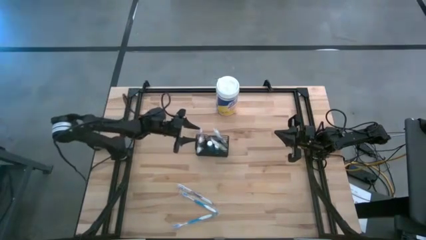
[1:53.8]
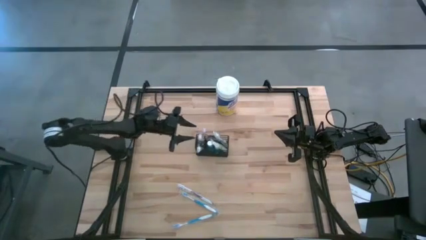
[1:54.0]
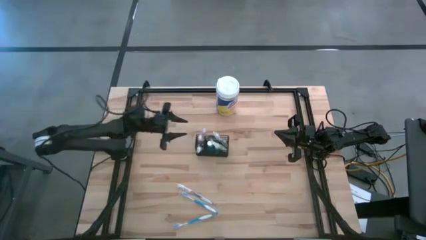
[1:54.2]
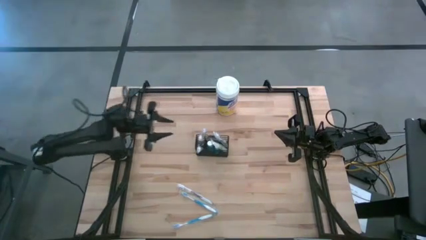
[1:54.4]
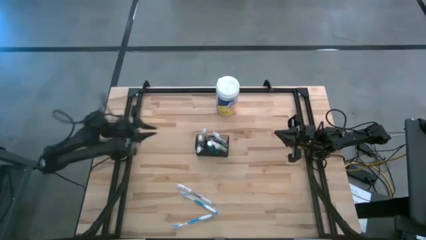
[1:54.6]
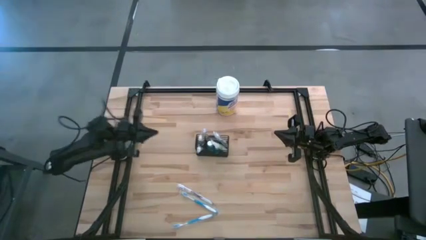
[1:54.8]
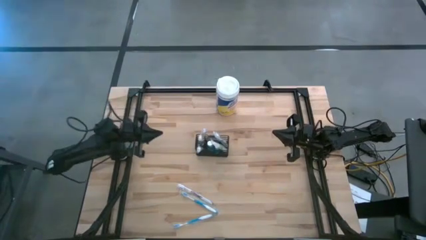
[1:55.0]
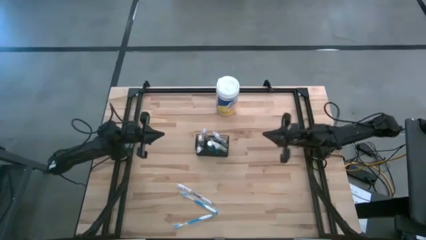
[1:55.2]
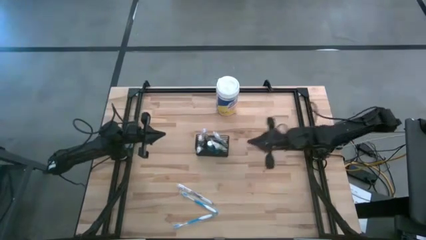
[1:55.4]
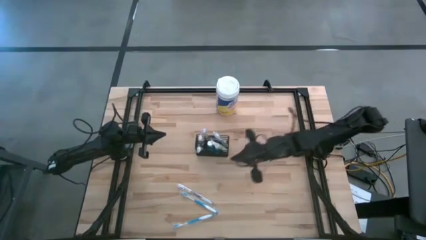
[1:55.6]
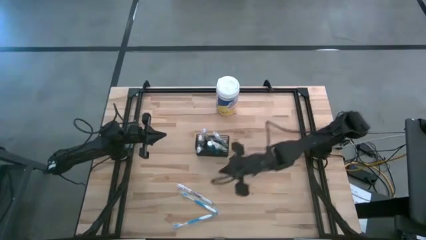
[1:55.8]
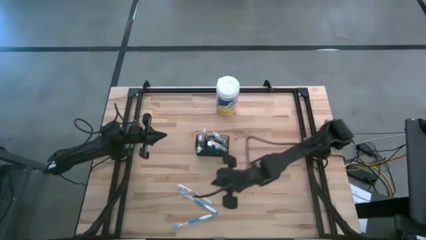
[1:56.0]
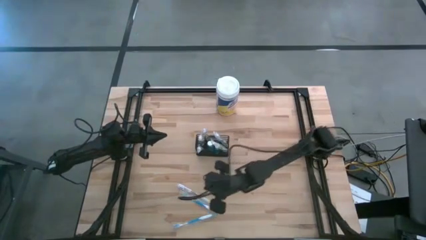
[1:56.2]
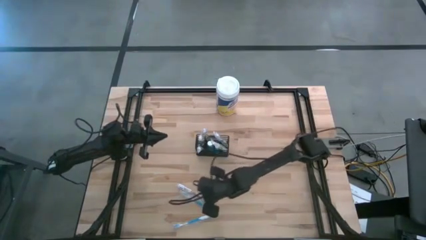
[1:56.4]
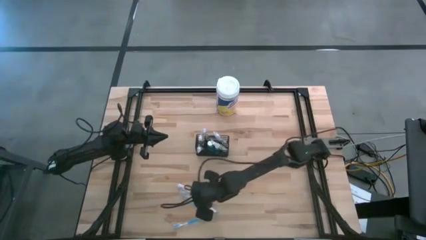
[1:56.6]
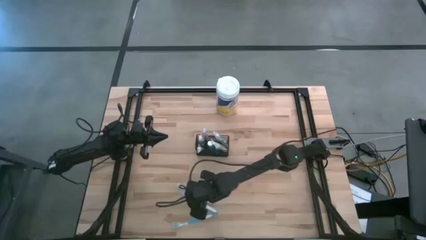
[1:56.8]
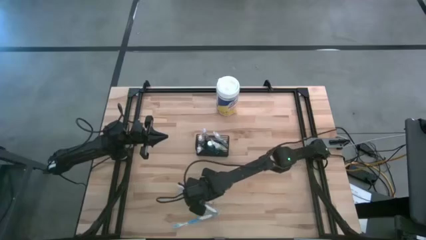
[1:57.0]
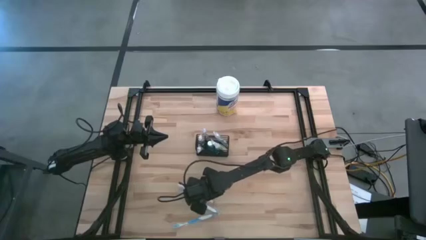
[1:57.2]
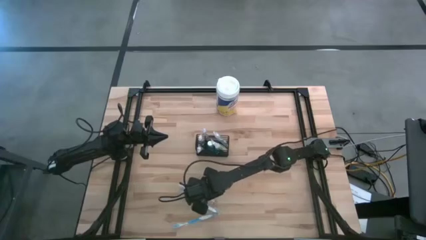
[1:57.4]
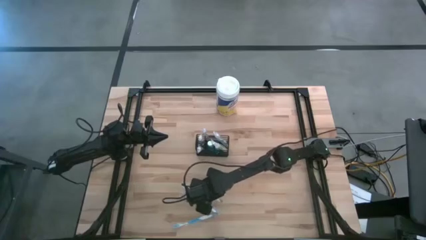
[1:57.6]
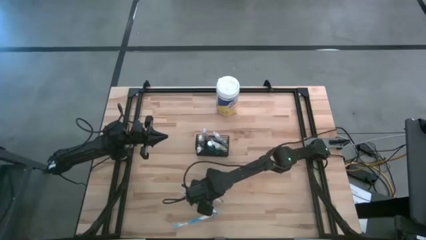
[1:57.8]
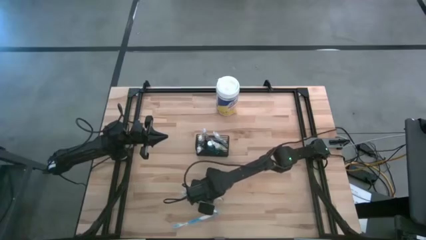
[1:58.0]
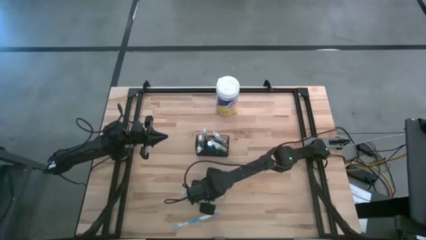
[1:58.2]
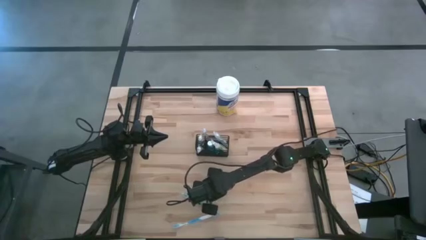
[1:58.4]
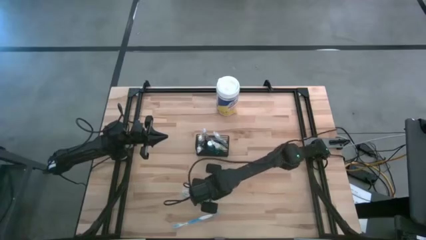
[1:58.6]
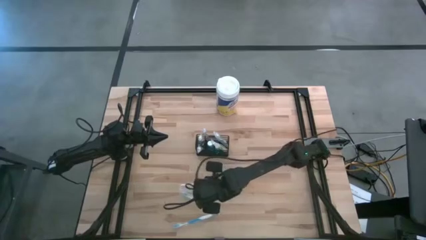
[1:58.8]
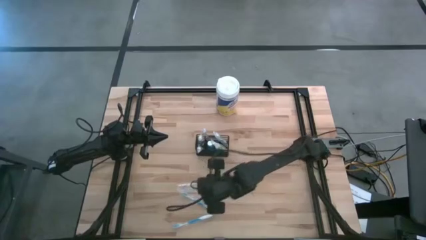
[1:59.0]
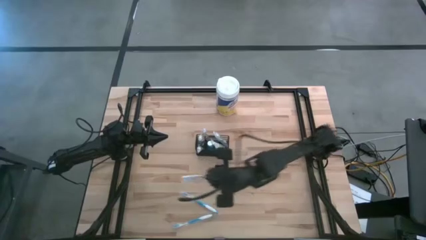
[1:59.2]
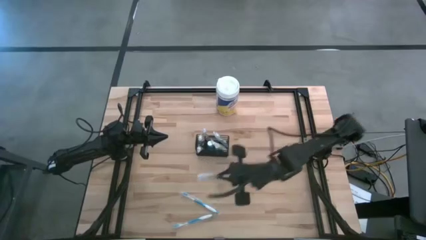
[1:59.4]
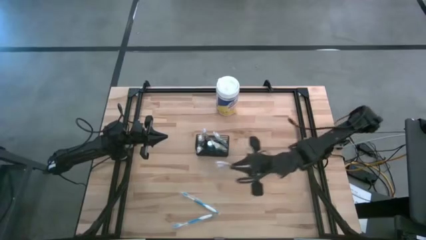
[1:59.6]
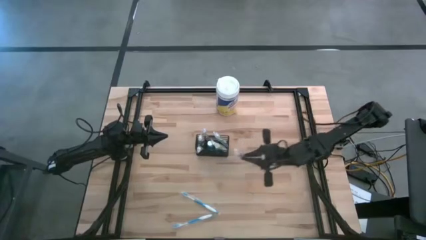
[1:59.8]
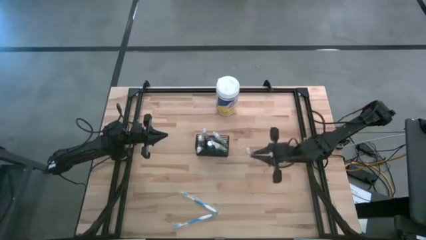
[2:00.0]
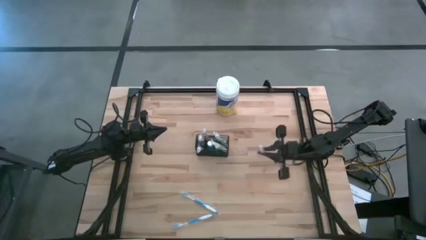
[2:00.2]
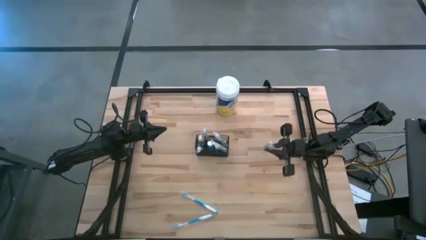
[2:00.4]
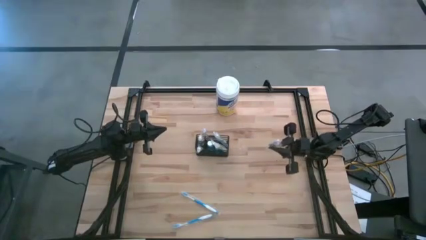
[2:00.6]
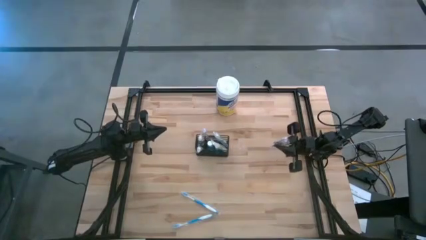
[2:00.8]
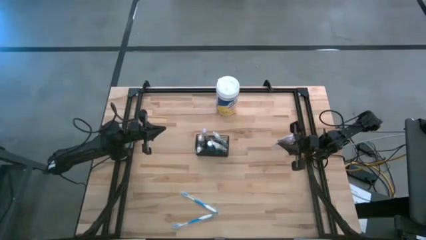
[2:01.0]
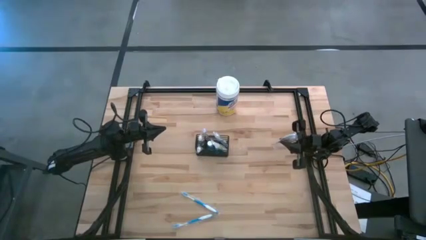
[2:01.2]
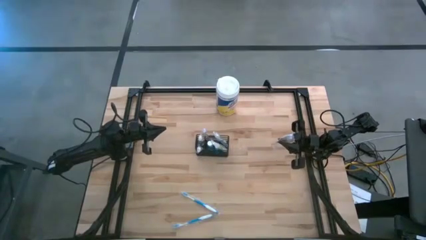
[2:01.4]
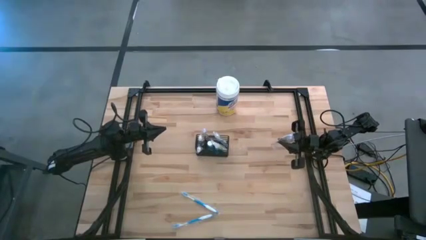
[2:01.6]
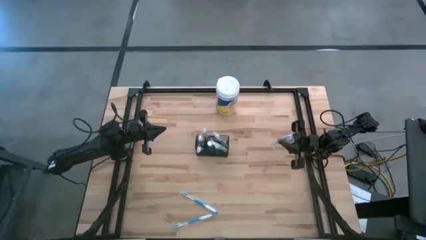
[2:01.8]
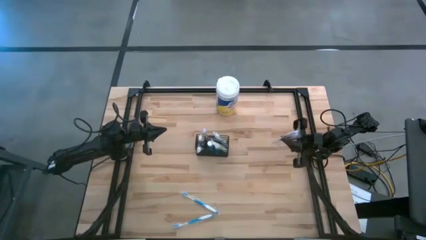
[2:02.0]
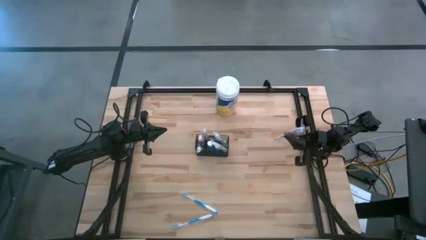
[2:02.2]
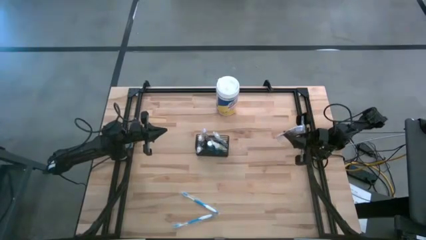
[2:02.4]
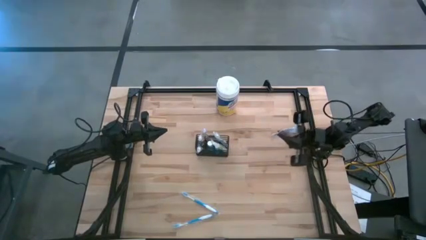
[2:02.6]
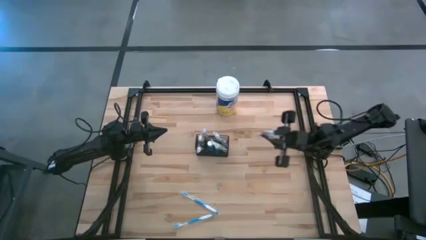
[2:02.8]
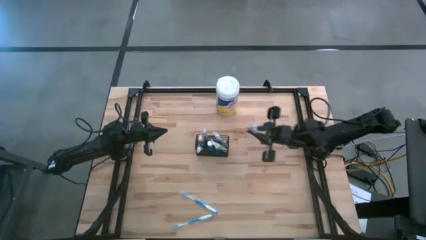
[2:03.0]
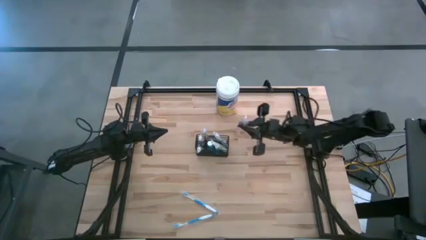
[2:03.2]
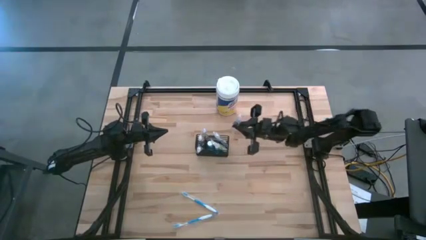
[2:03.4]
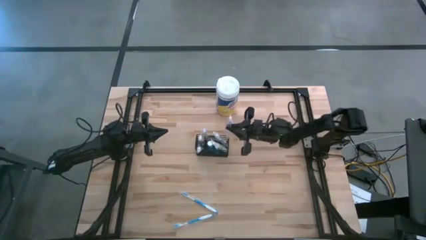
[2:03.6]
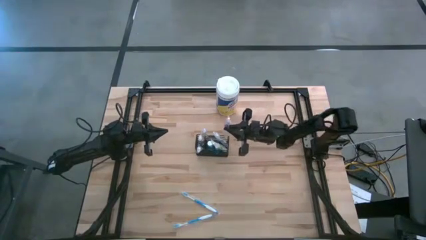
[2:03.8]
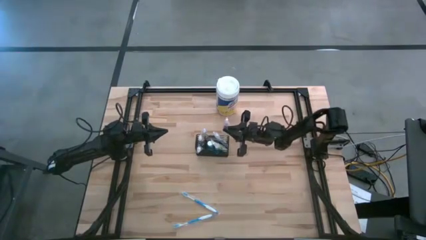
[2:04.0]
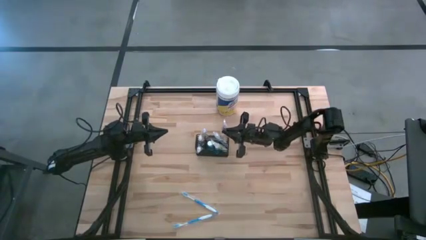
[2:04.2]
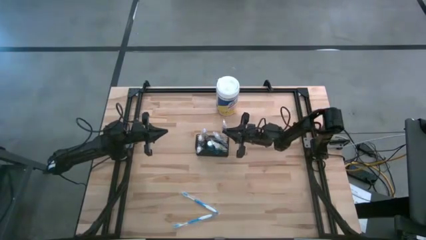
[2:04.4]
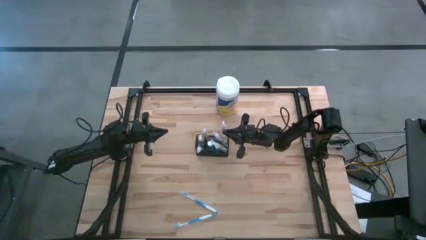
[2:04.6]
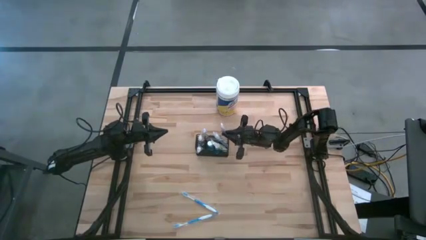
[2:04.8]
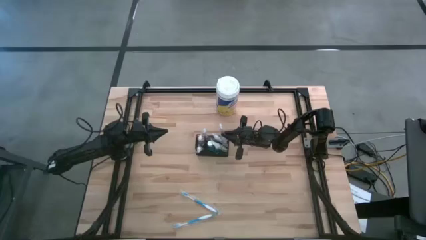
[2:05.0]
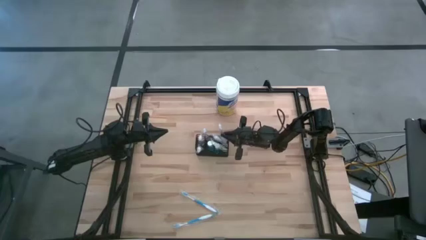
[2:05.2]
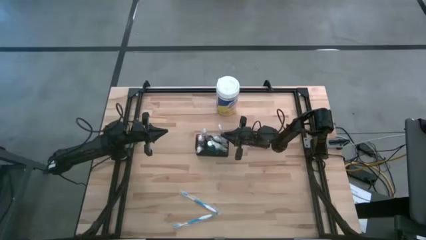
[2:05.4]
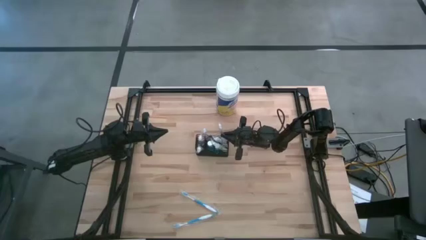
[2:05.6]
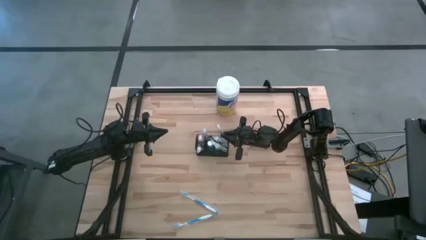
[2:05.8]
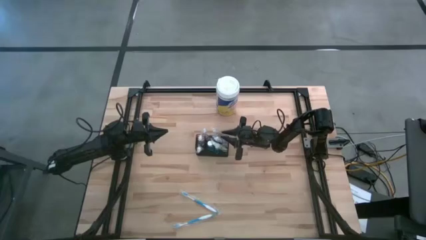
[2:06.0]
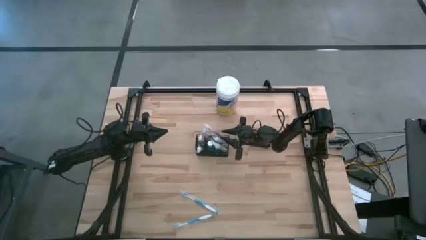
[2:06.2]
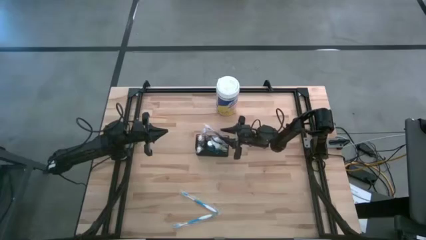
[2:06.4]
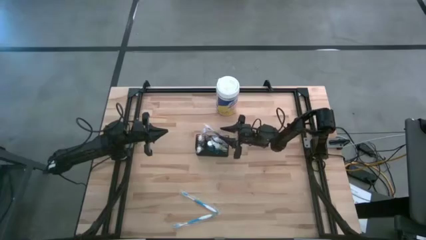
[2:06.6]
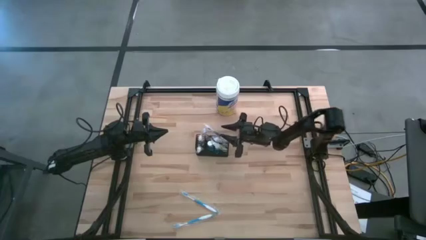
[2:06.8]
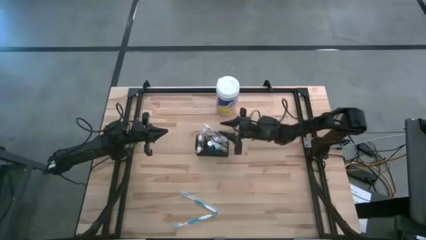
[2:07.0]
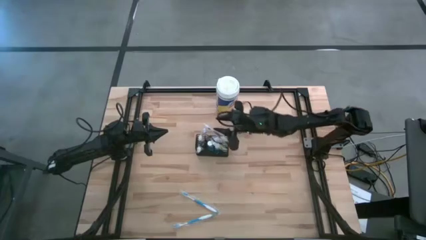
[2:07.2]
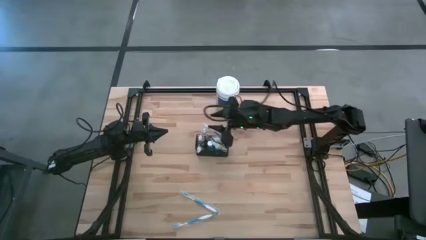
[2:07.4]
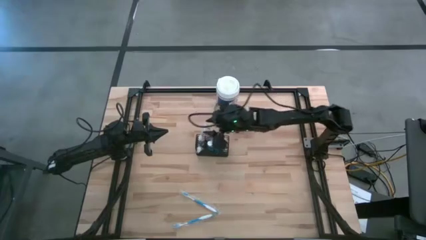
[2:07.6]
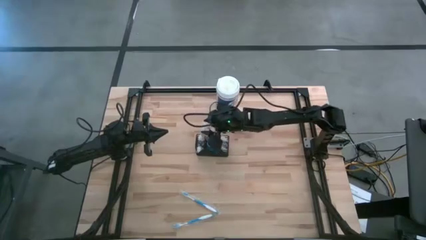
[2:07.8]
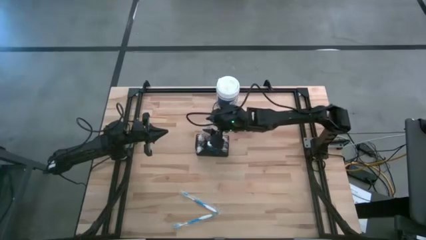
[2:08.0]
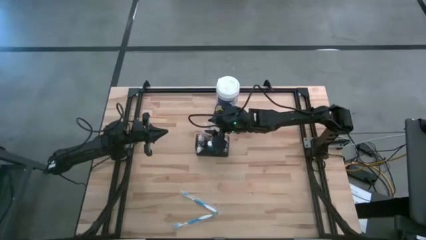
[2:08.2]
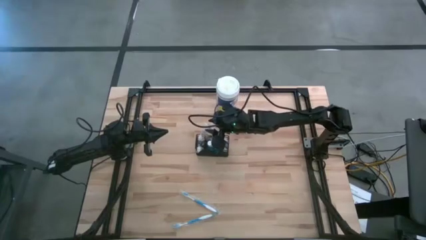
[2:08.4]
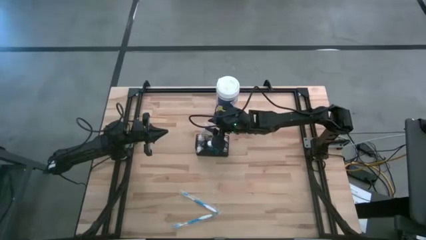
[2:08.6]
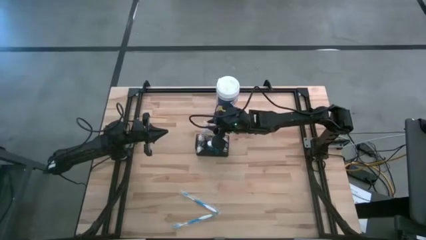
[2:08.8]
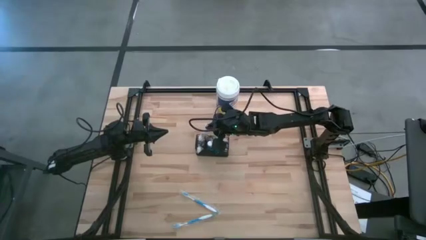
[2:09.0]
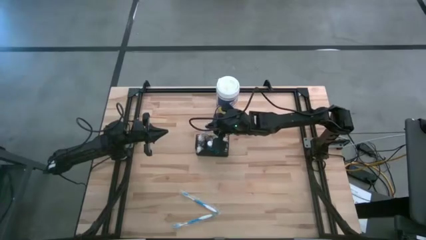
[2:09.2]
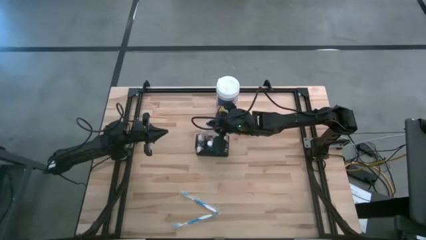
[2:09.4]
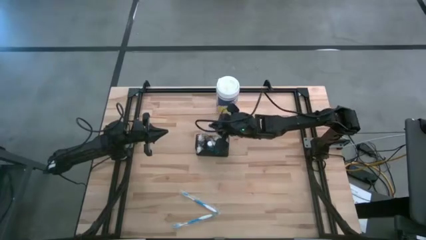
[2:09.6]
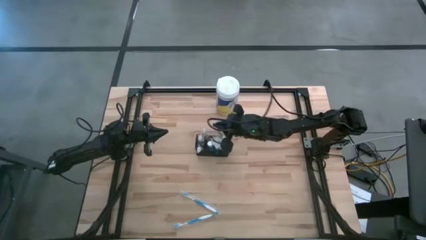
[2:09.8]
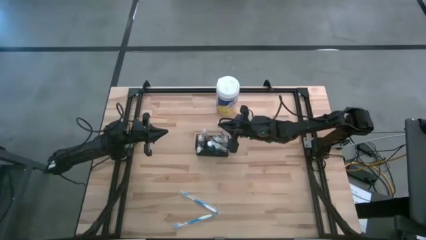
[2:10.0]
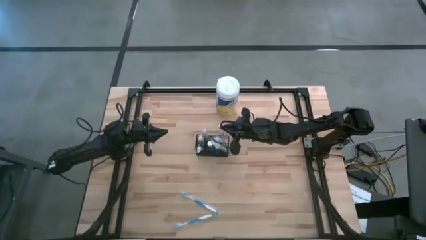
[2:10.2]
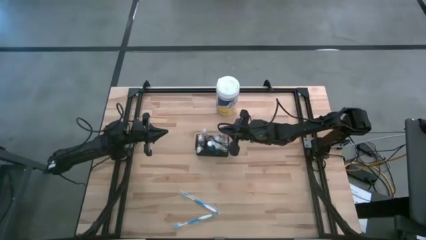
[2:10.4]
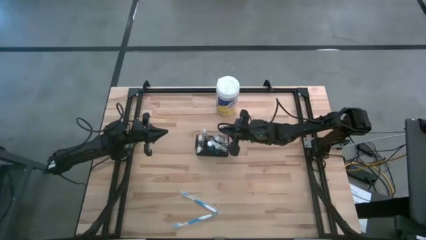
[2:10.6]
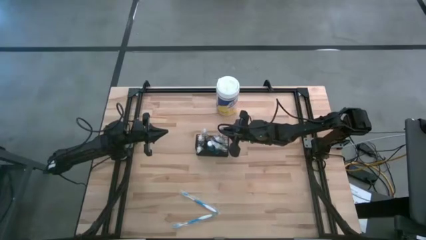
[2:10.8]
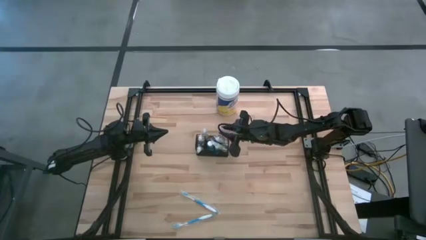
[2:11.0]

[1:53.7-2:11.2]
Task: Pick & Place toothbrushing station
Put the violet toothbrush into the black wire organizer
